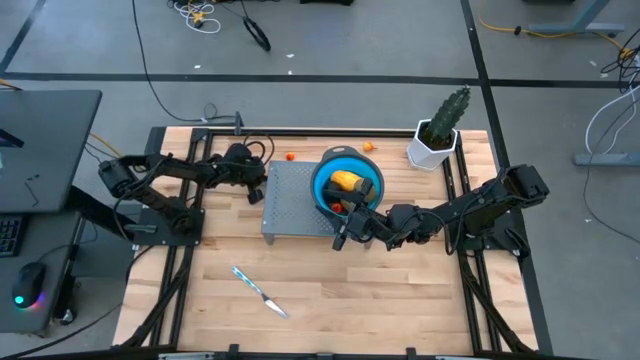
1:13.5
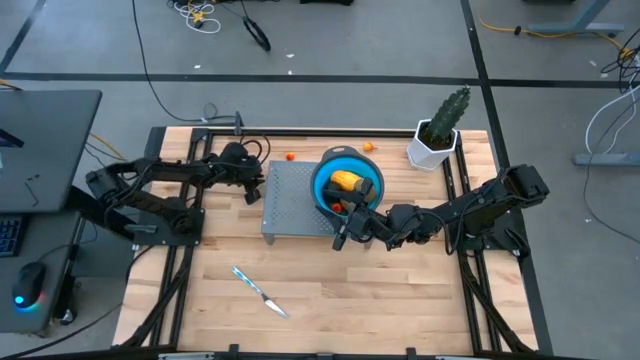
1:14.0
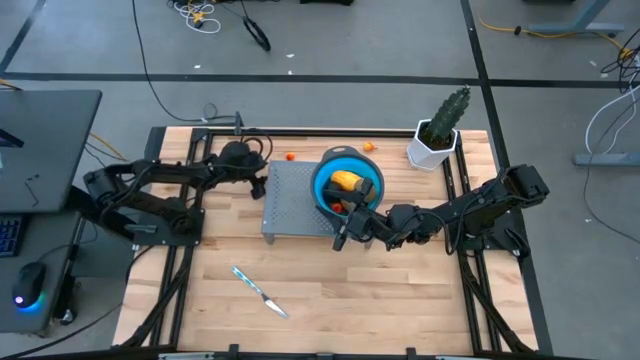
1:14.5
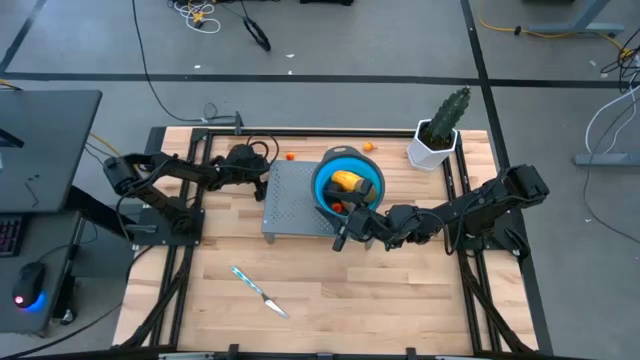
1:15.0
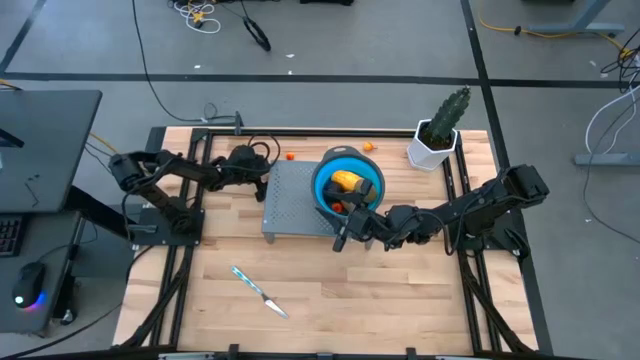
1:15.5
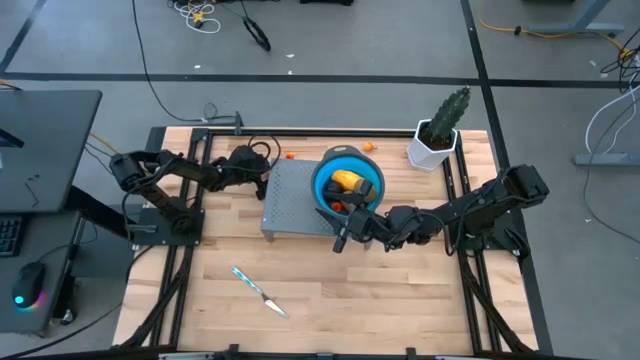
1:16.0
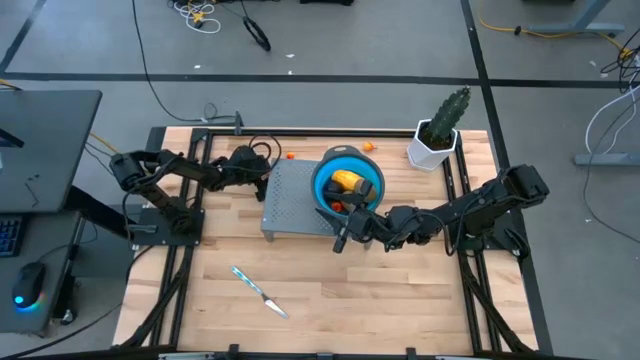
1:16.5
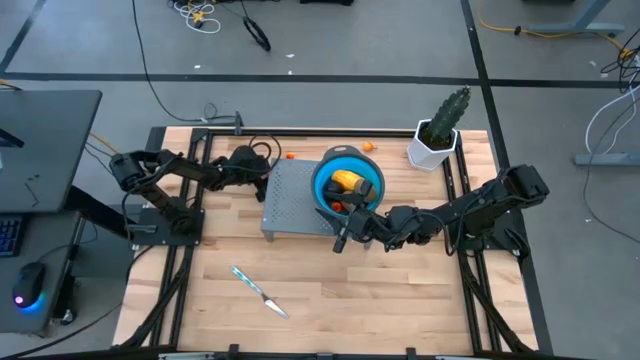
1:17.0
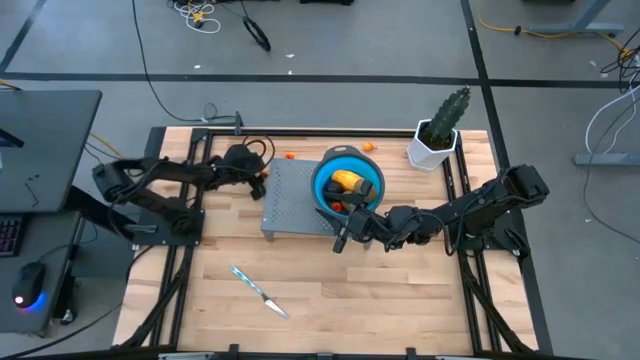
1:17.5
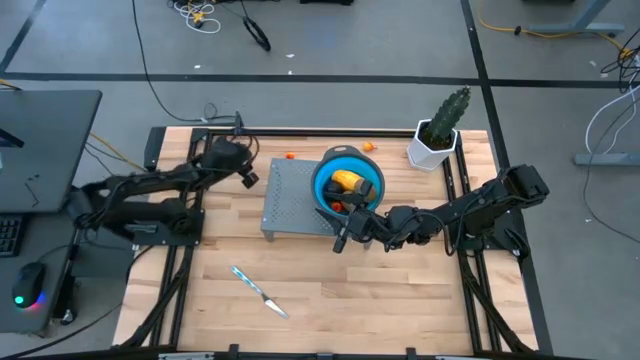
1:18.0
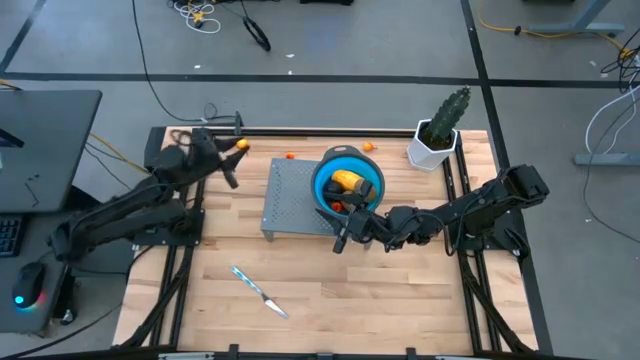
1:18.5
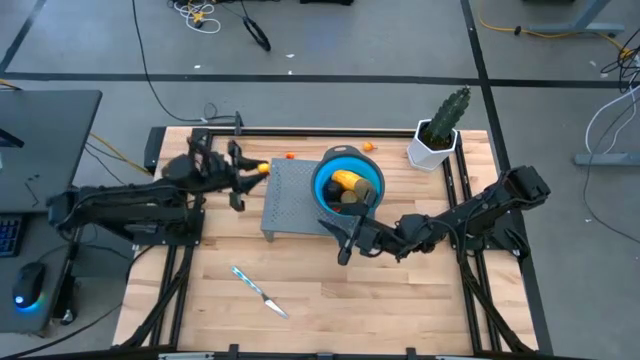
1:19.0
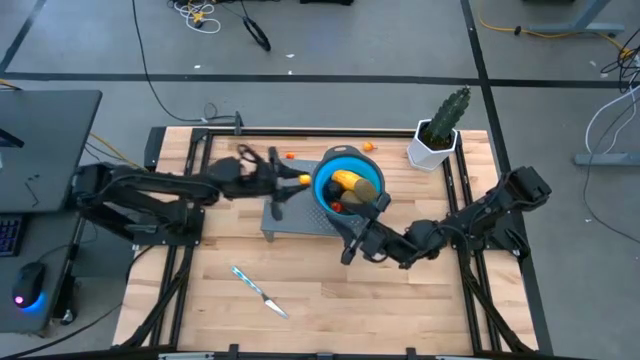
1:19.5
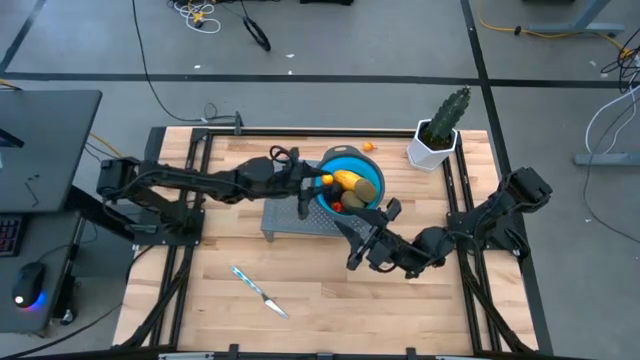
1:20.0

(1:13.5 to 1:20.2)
Task: Pick & Place Fruit
Put the orange pear into the blue strainer bowl on the shelf

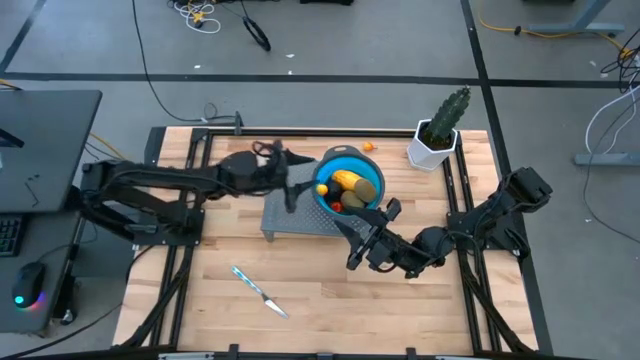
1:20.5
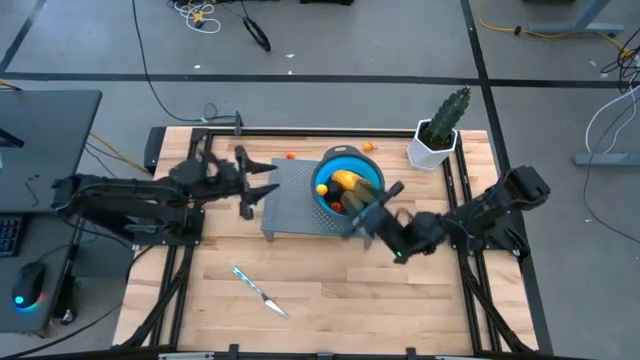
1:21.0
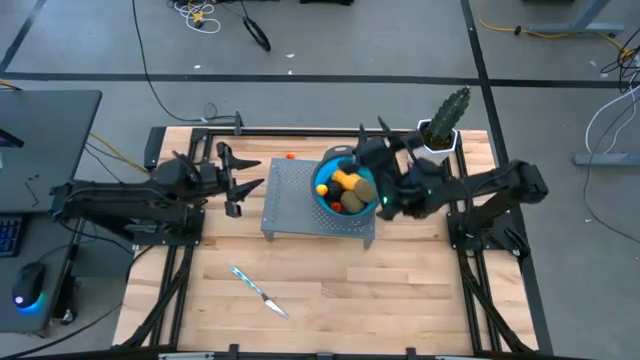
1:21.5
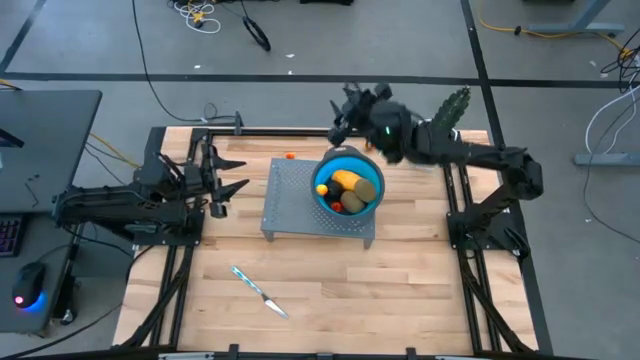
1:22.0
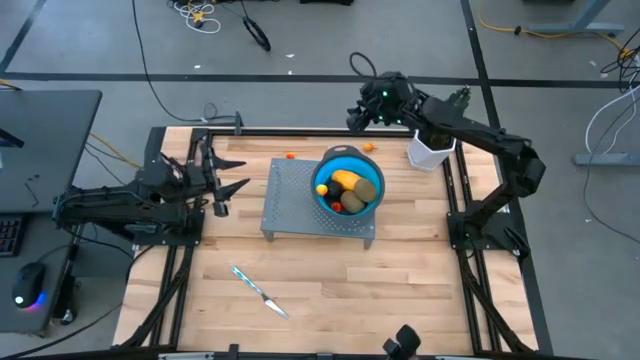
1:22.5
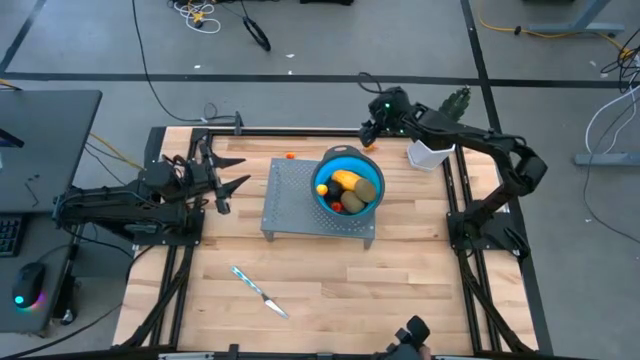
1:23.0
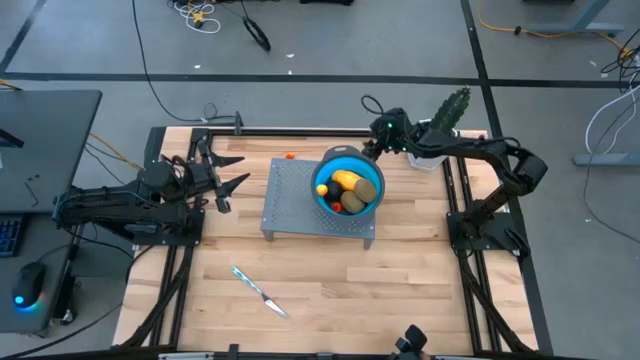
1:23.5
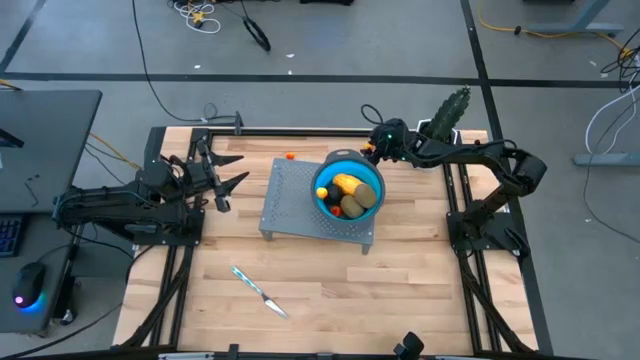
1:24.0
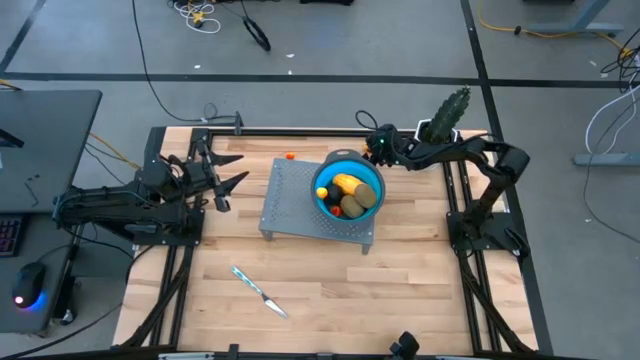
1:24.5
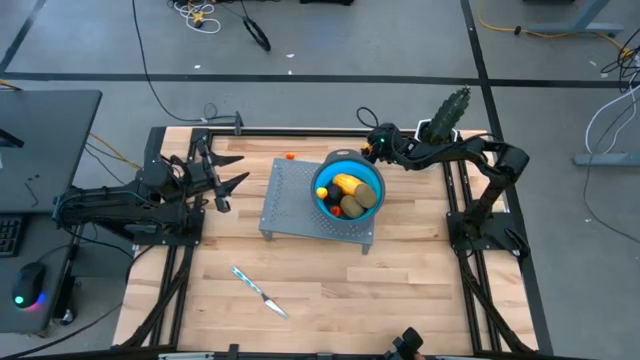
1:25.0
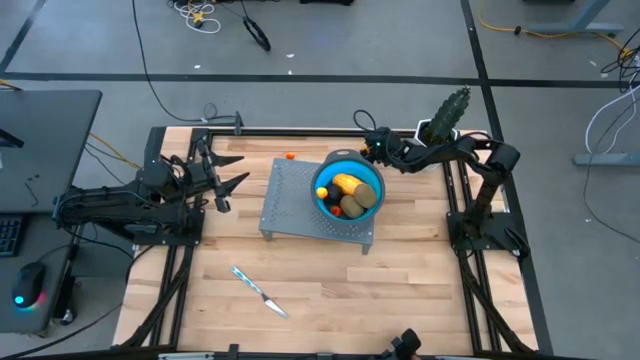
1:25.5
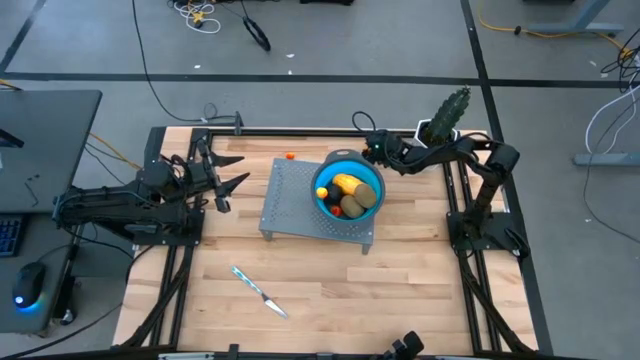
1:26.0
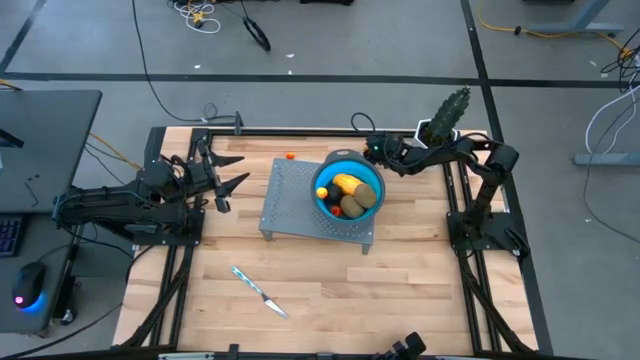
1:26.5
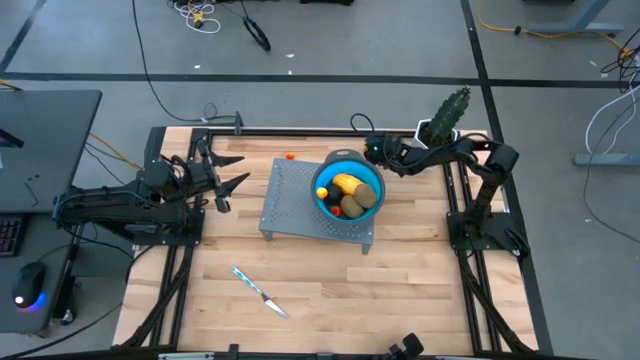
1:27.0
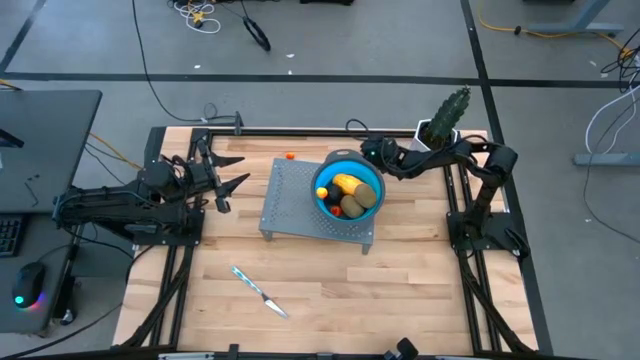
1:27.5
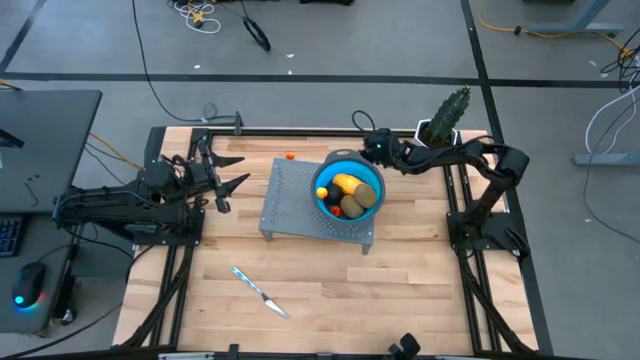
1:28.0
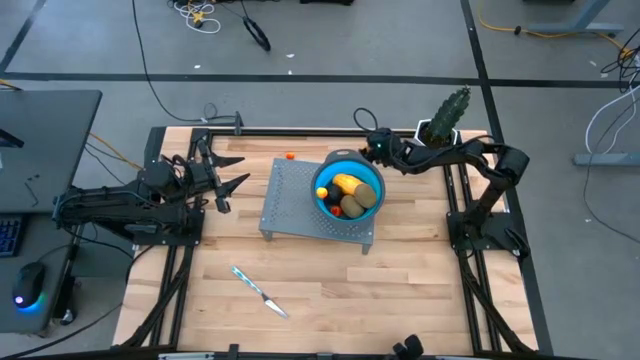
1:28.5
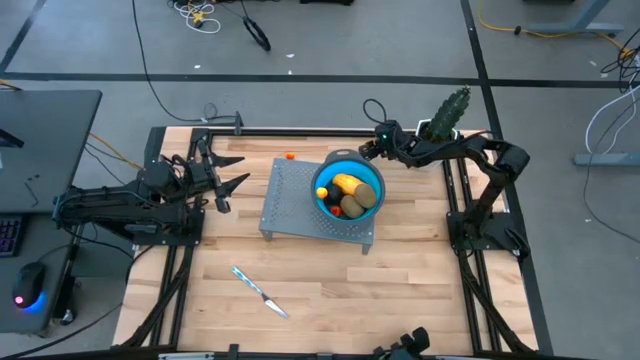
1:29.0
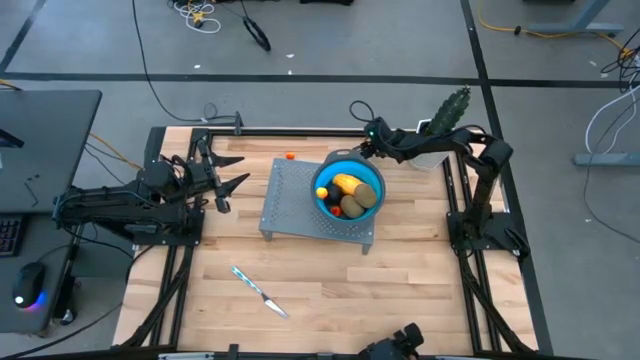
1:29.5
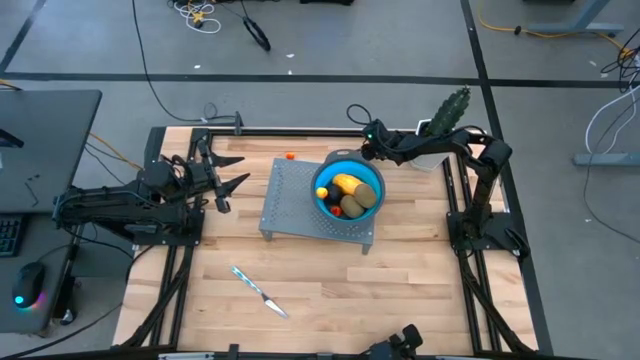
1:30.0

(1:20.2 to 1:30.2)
Put the orange pear into the blue strainer bowl on the shelf

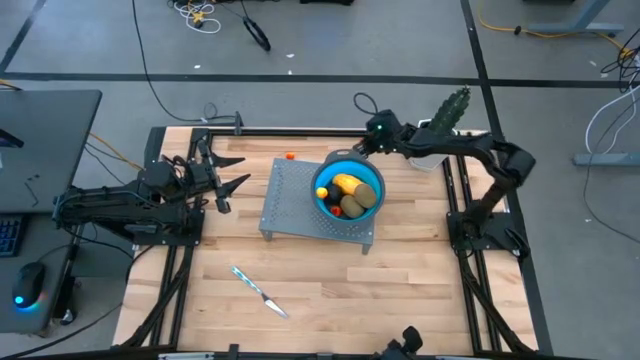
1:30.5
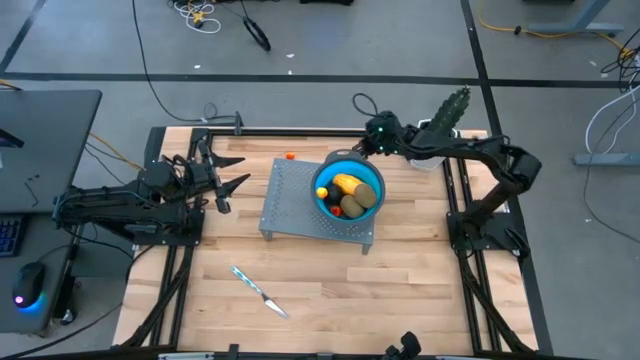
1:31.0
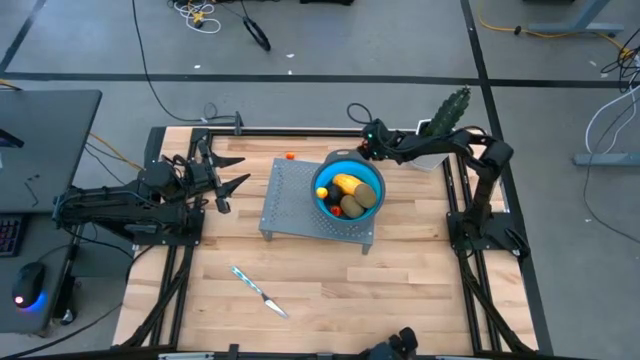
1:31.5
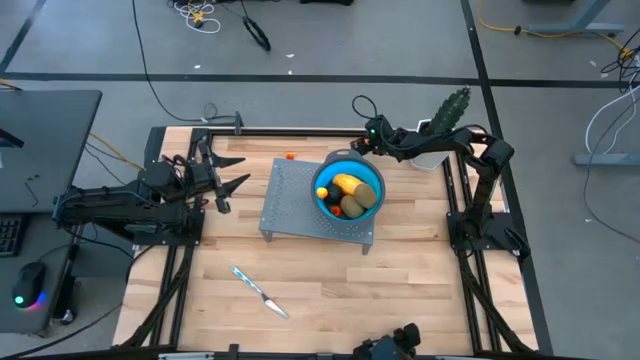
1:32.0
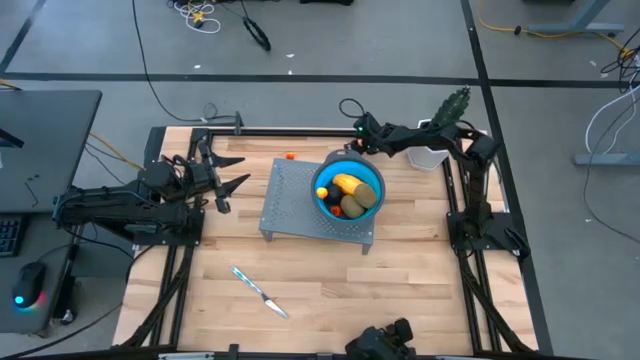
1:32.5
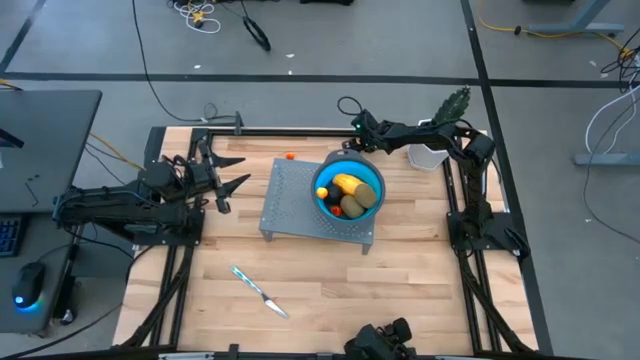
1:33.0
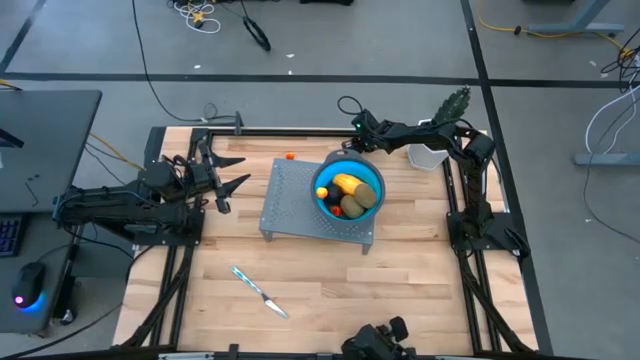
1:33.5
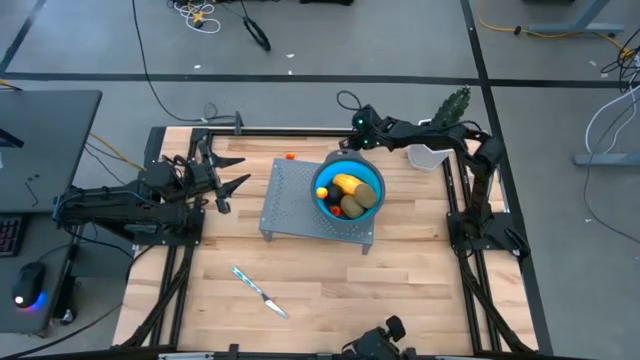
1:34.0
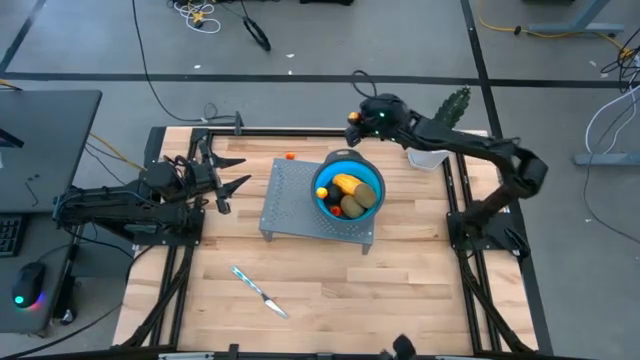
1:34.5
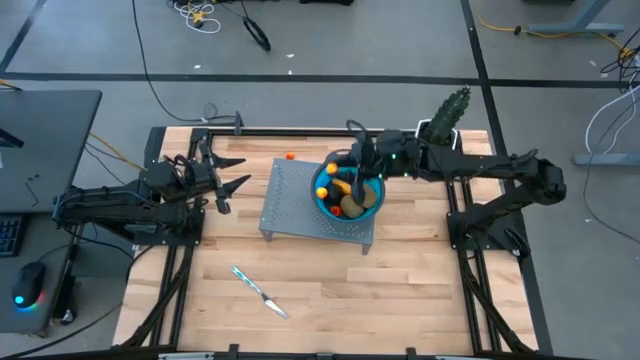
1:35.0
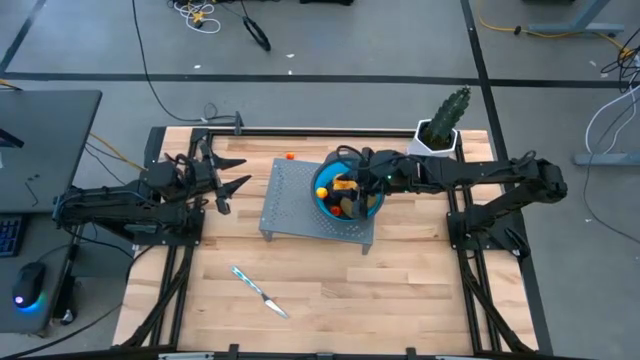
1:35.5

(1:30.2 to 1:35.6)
Put the orange pear into the blue strainer bowl on the shelf
